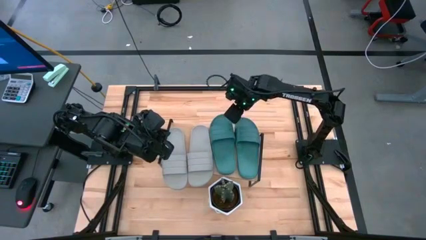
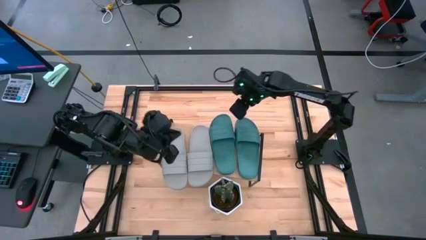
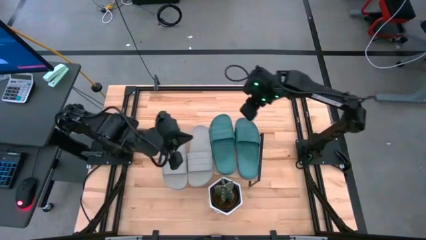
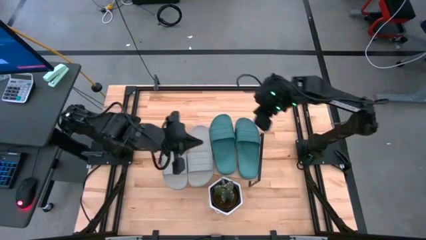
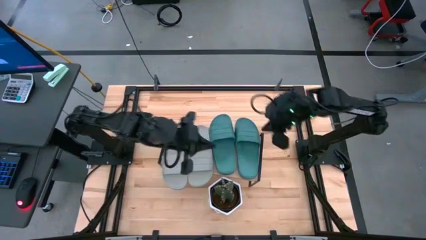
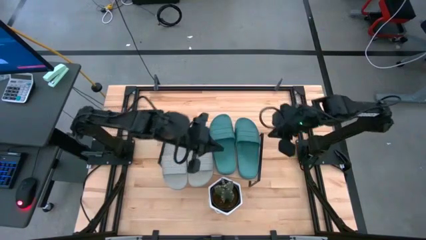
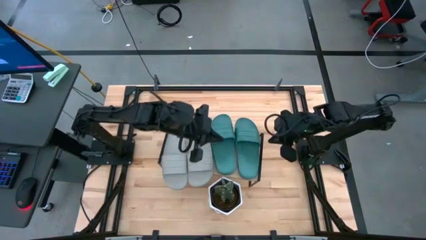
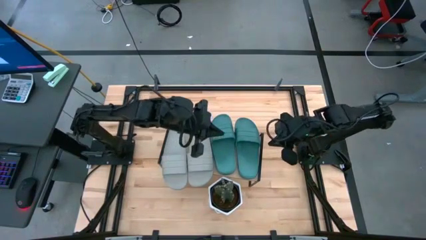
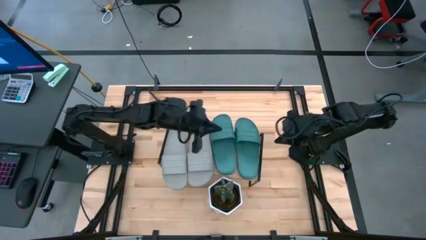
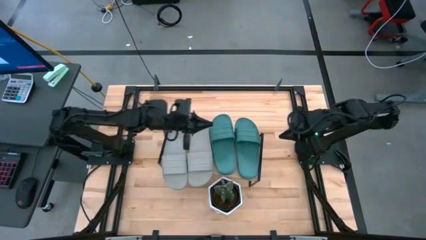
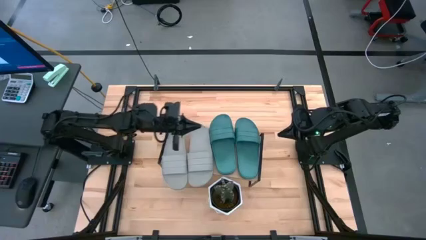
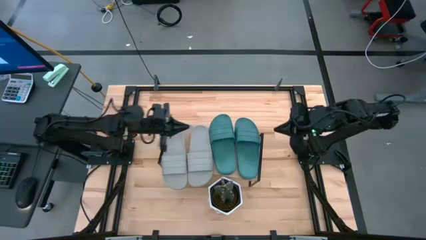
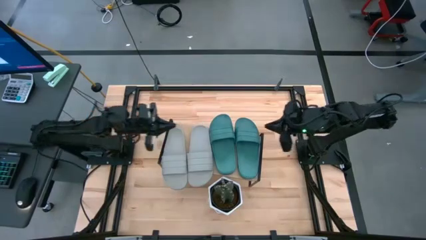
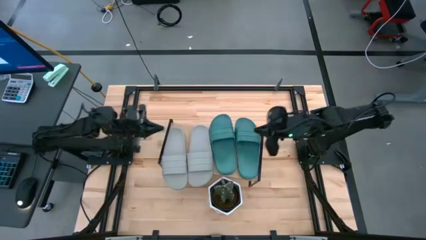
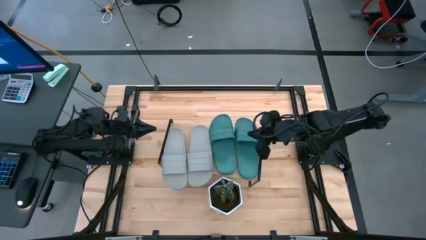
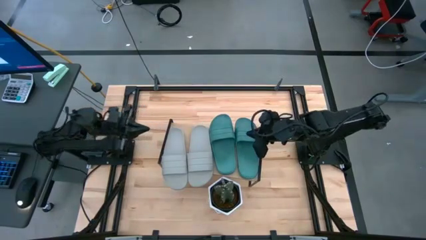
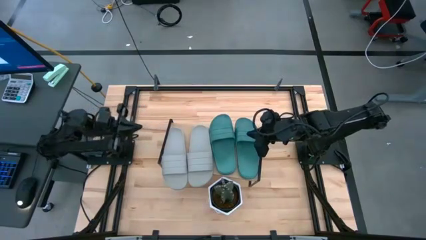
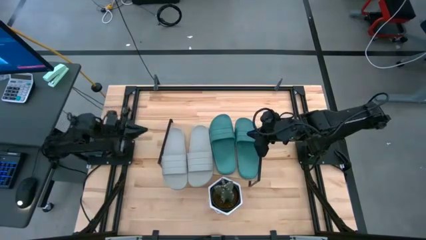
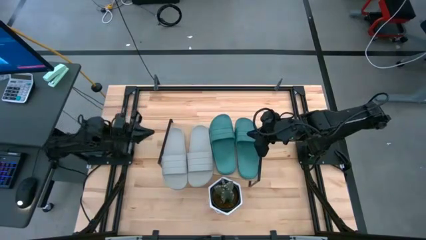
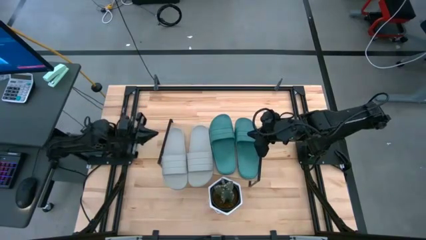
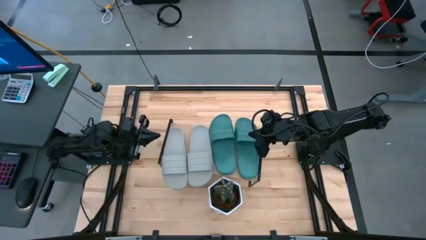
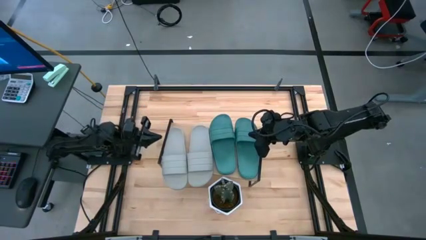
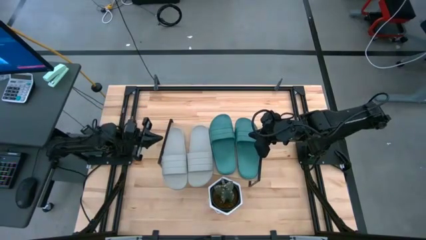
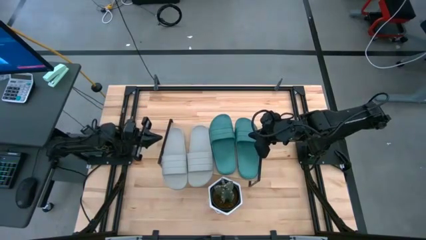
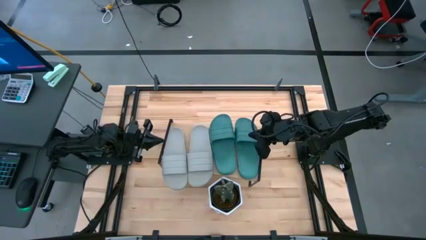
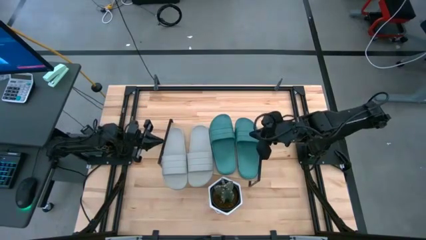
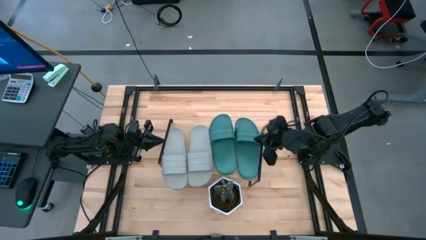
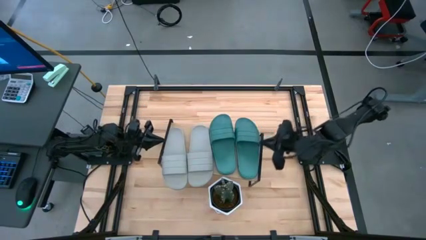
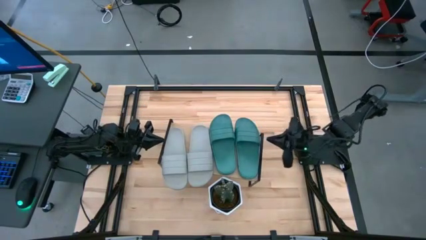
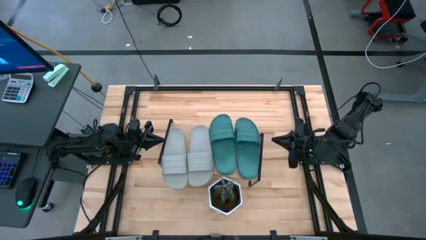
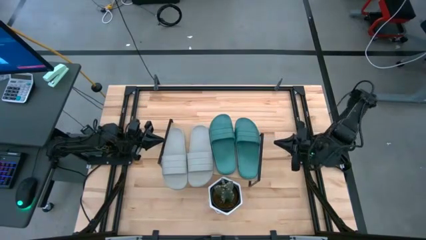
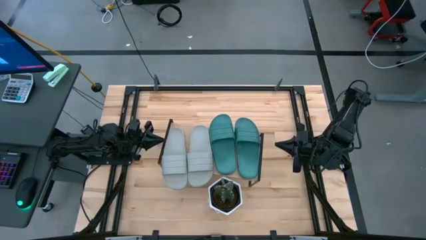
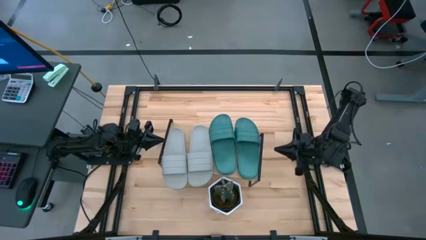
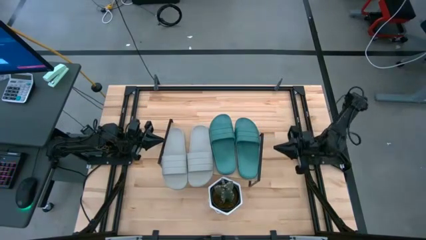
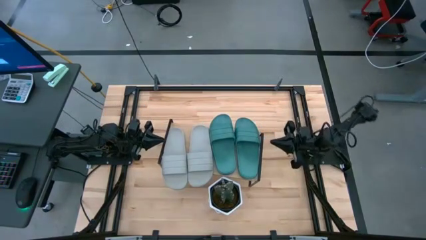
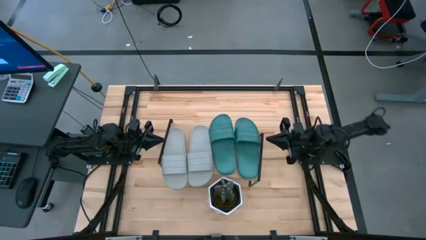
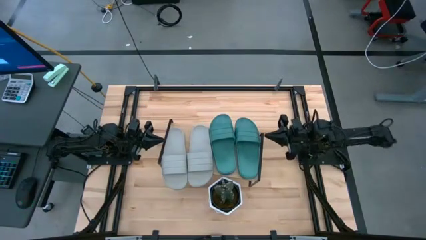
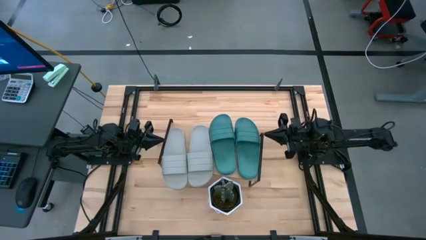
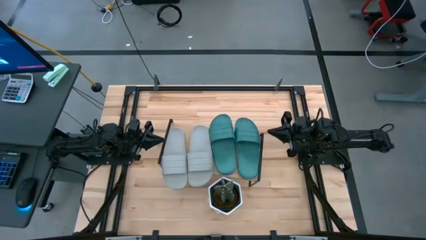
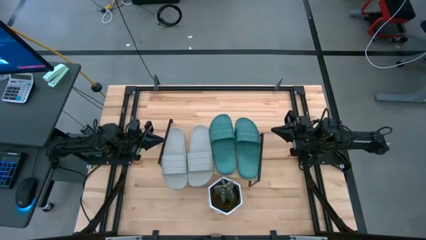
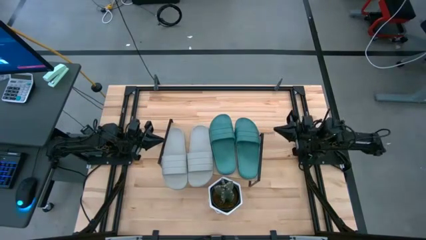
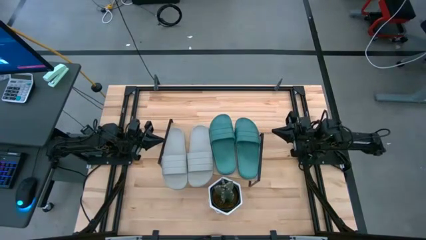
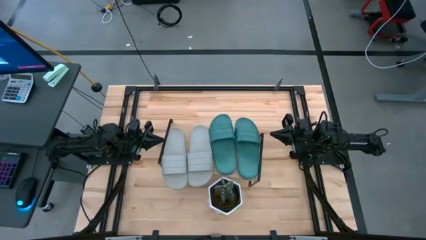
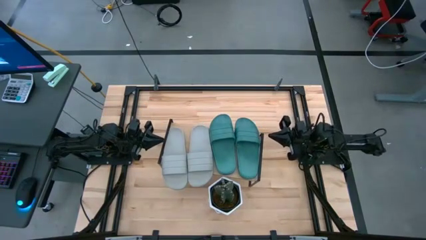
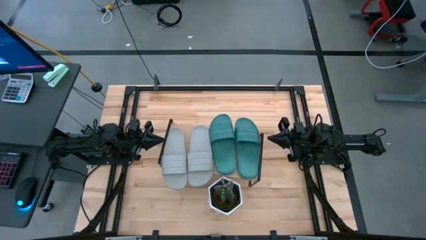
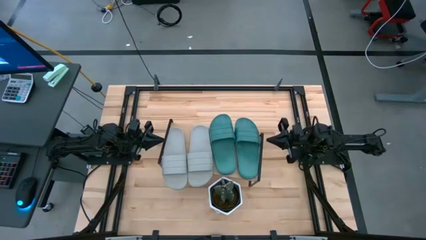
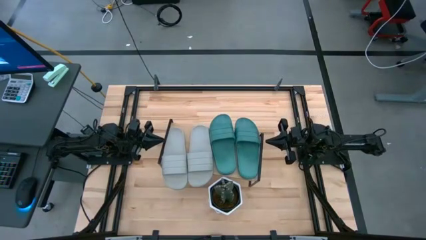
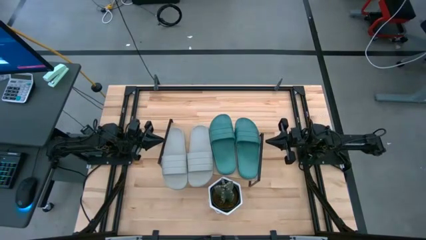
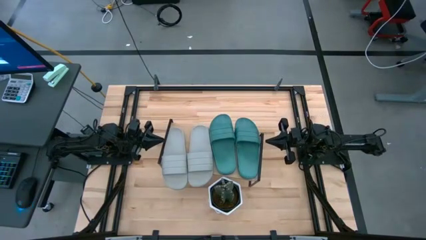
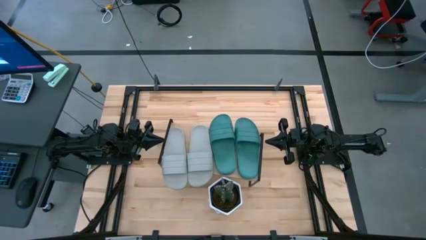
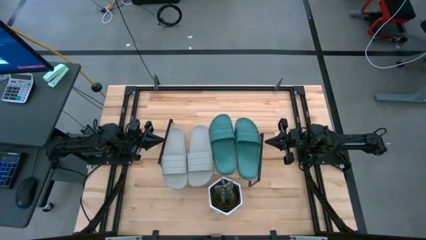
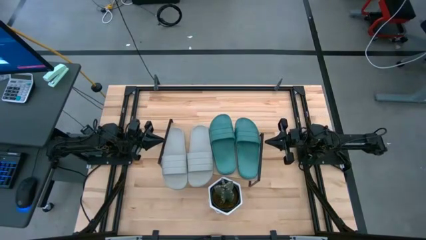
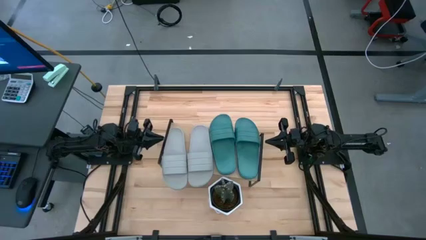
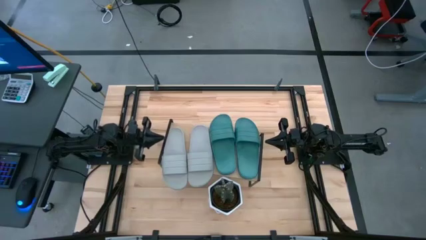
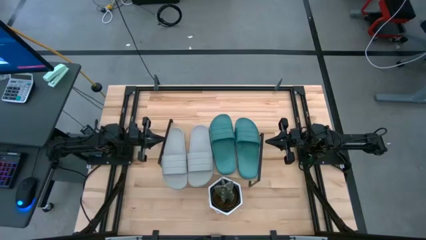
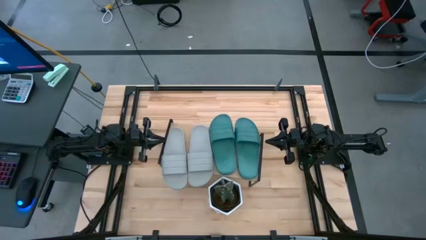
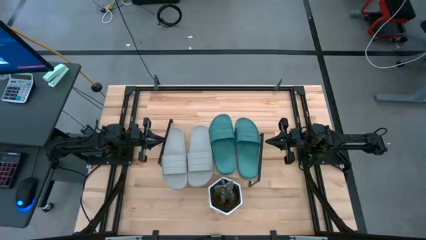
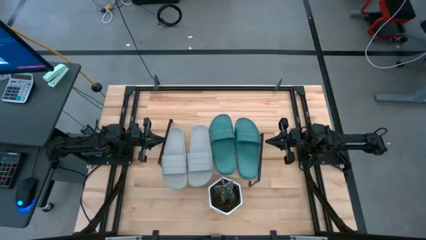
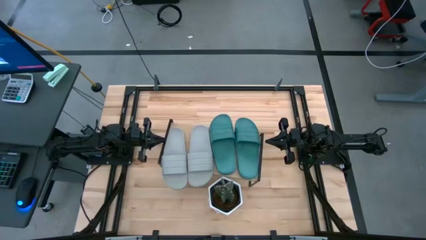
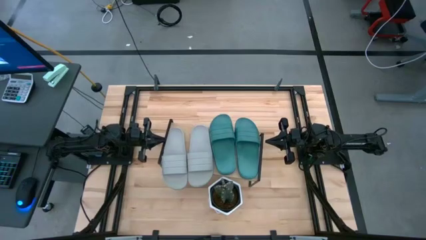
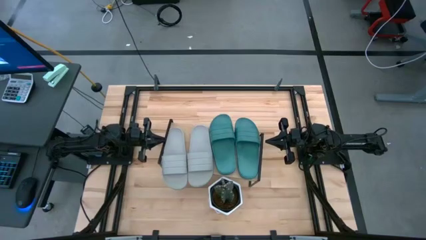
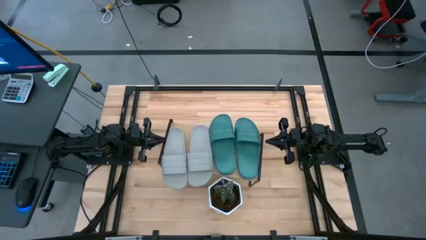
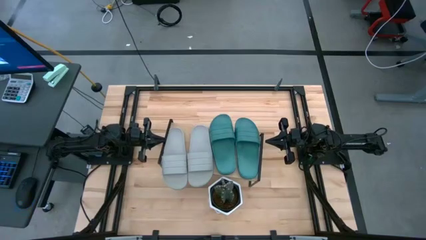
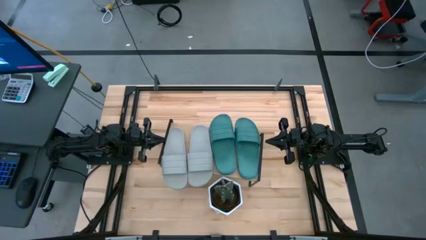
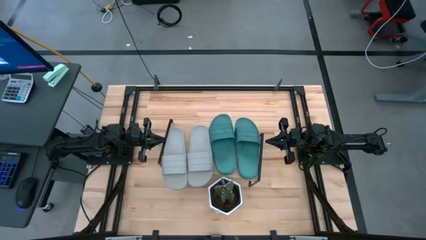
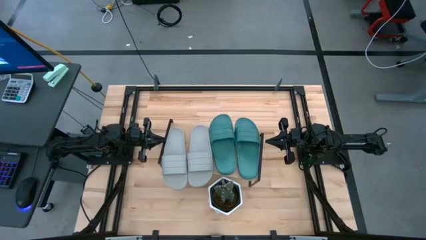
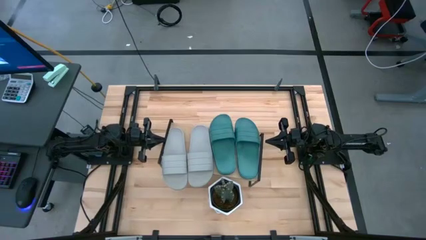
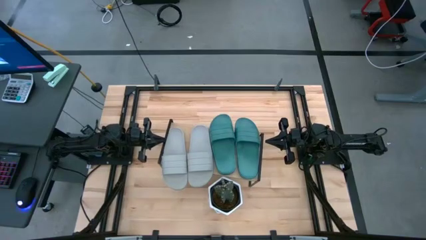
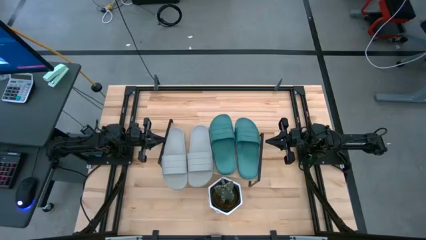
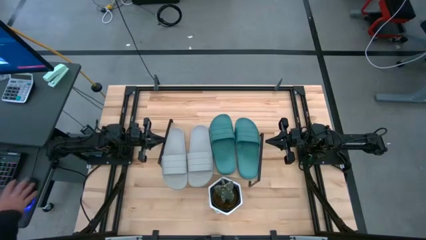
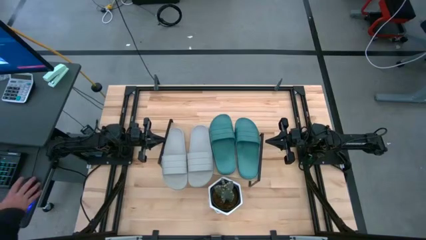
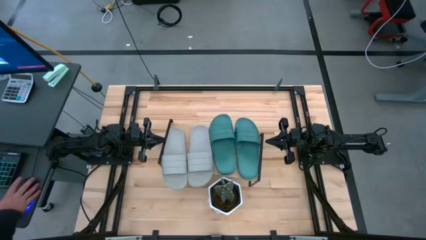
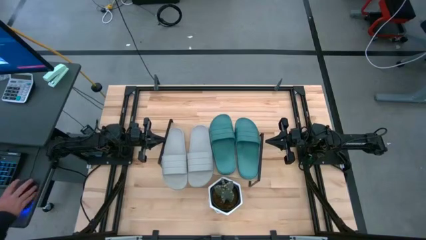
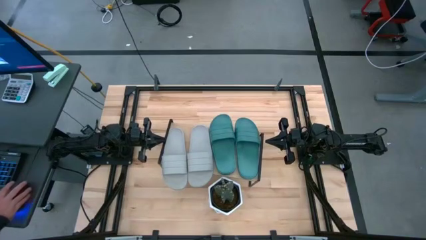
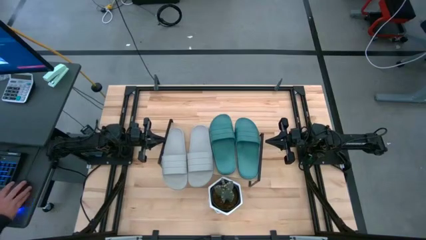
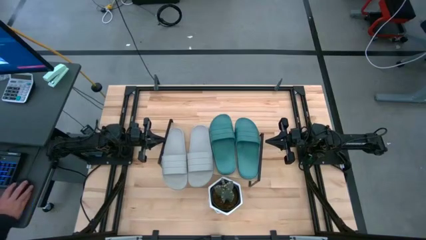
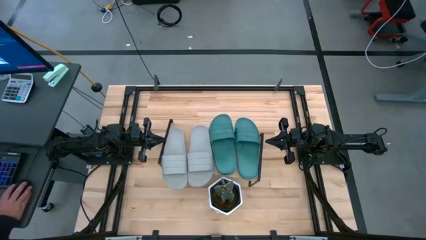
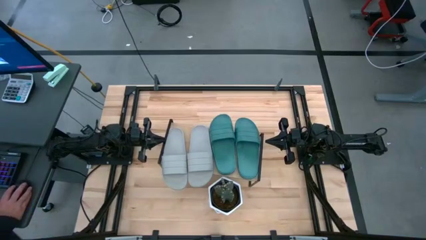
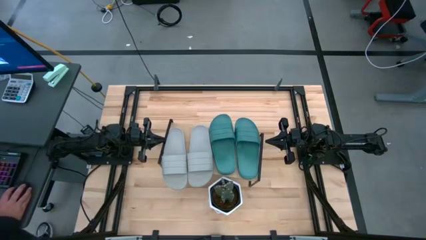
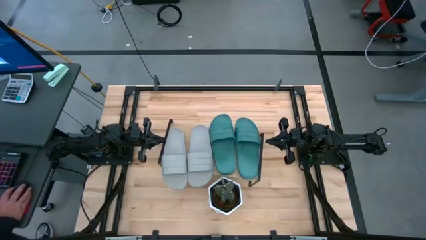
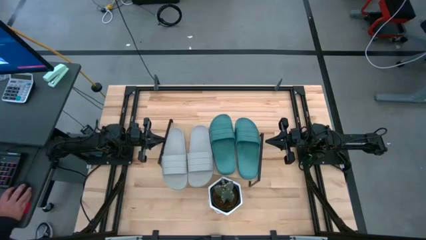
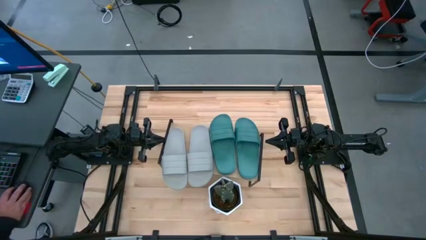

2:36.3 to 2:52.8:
Task: Pick and place slides into the shelf
Return to Home Position
